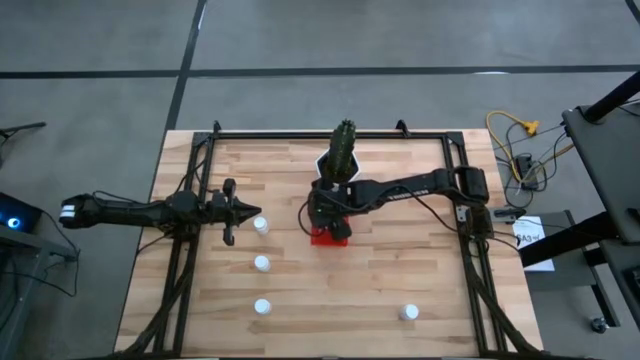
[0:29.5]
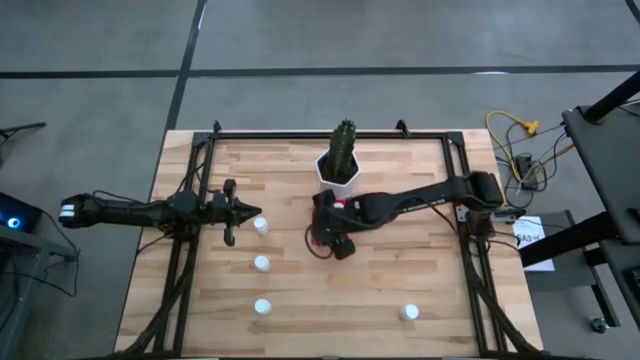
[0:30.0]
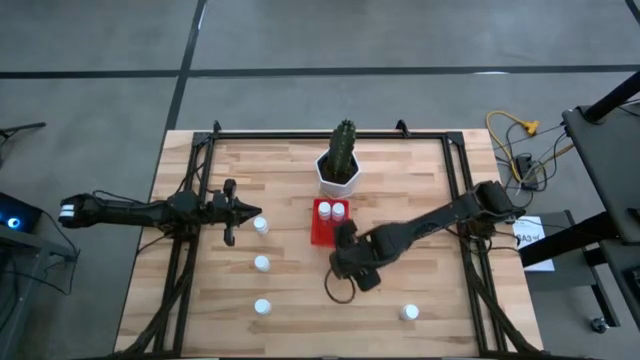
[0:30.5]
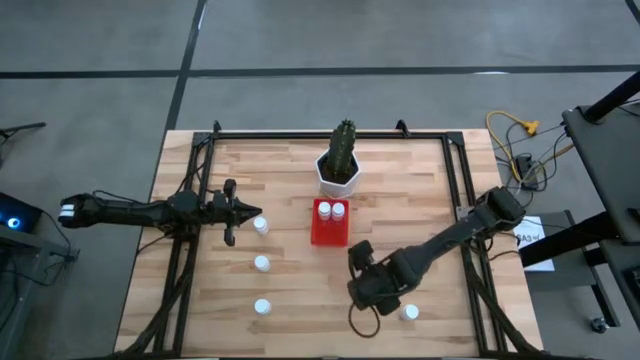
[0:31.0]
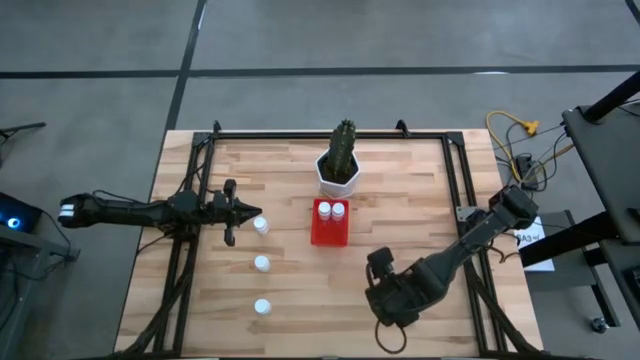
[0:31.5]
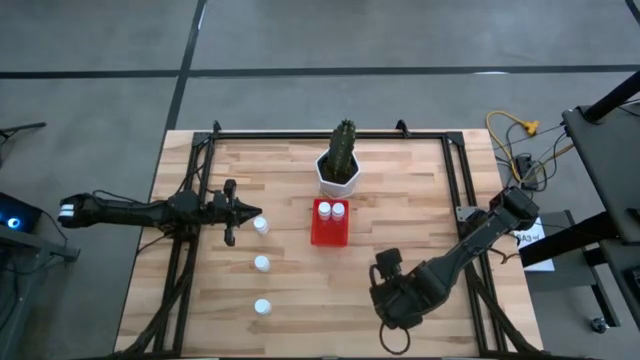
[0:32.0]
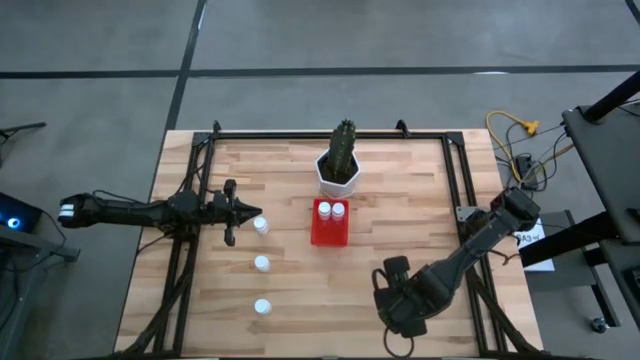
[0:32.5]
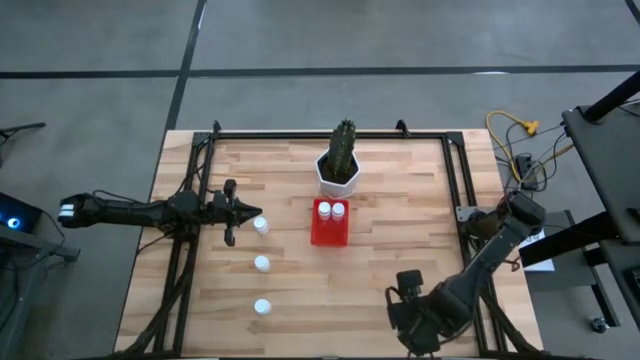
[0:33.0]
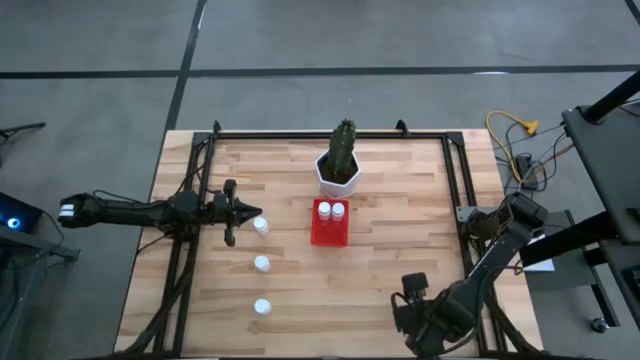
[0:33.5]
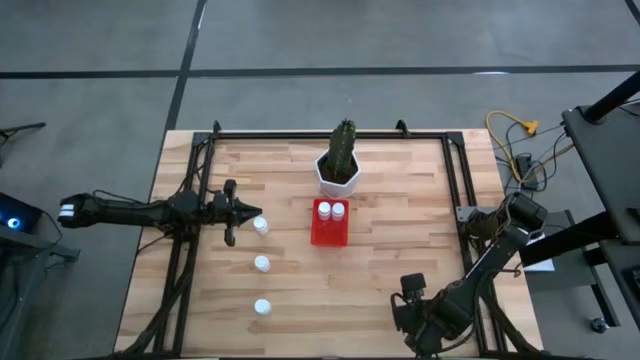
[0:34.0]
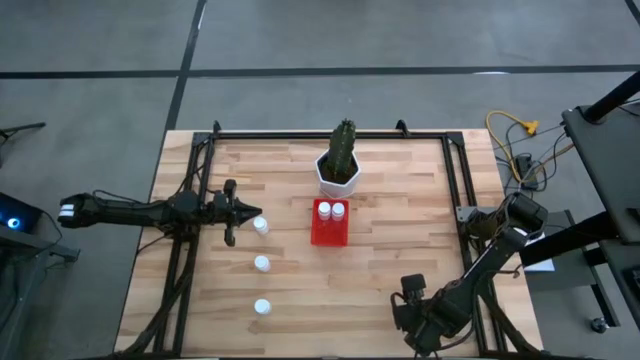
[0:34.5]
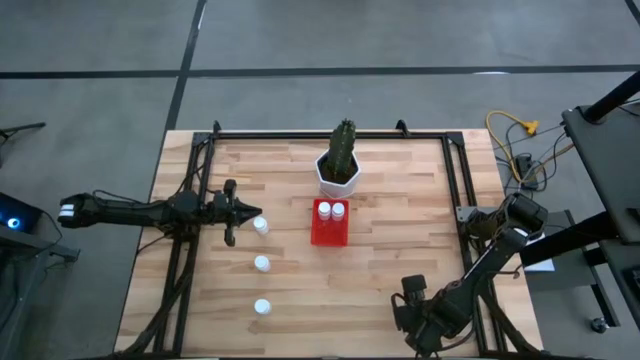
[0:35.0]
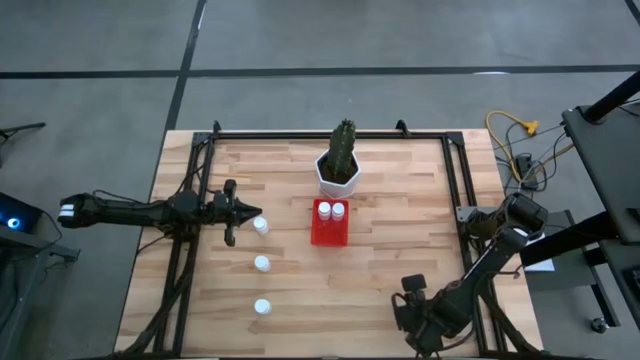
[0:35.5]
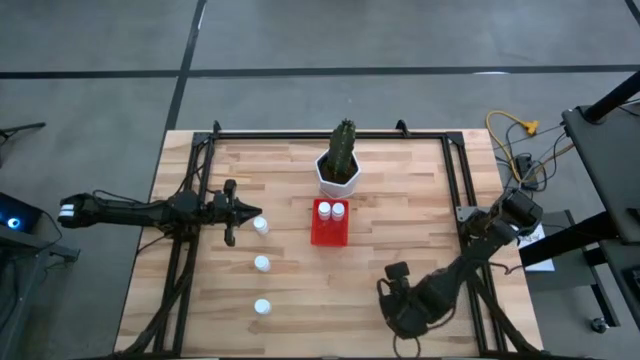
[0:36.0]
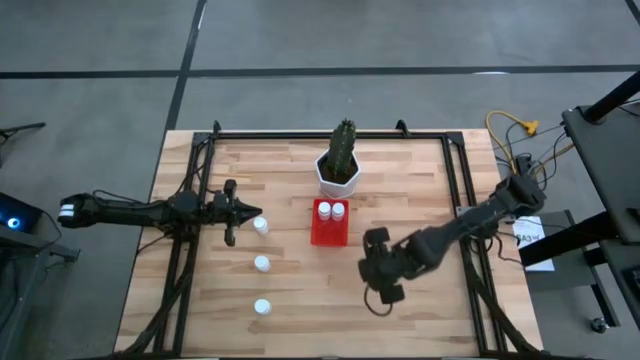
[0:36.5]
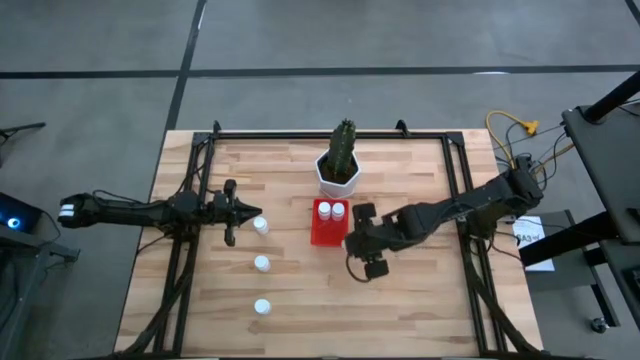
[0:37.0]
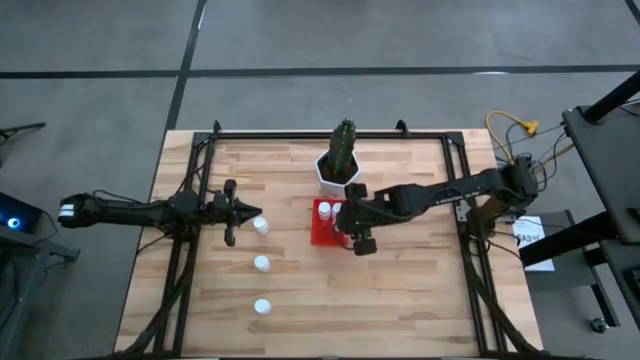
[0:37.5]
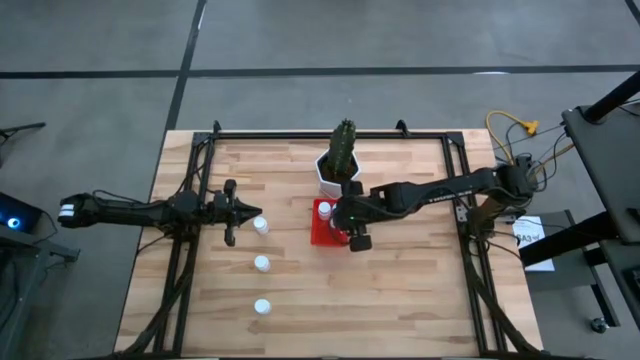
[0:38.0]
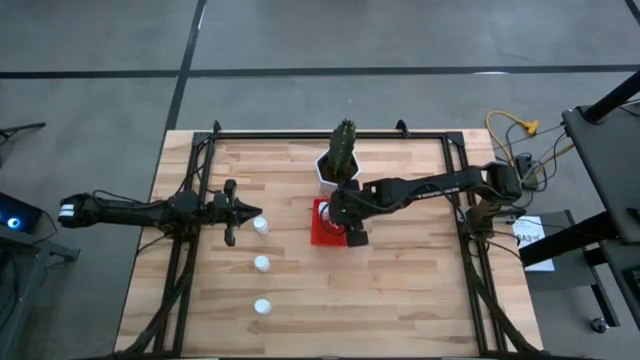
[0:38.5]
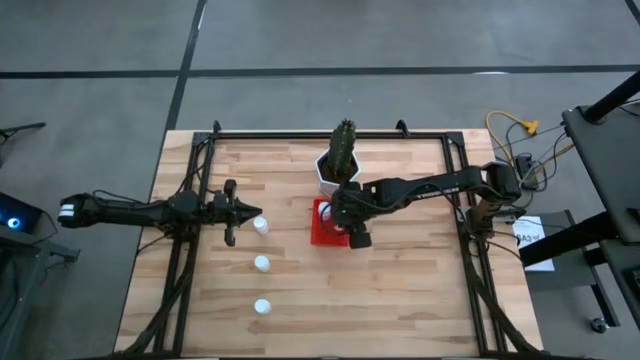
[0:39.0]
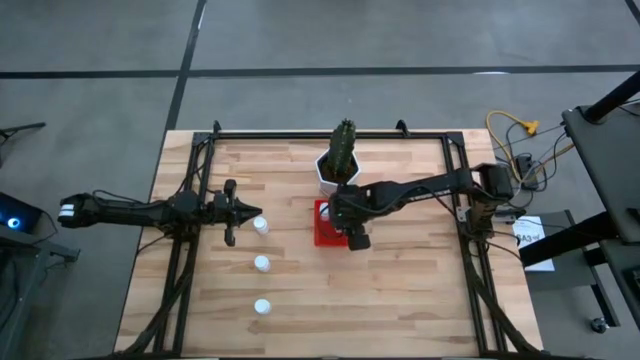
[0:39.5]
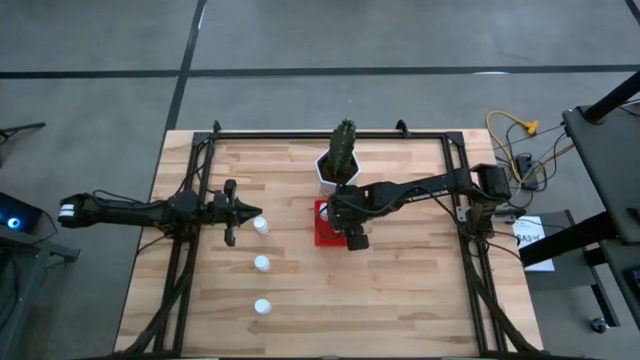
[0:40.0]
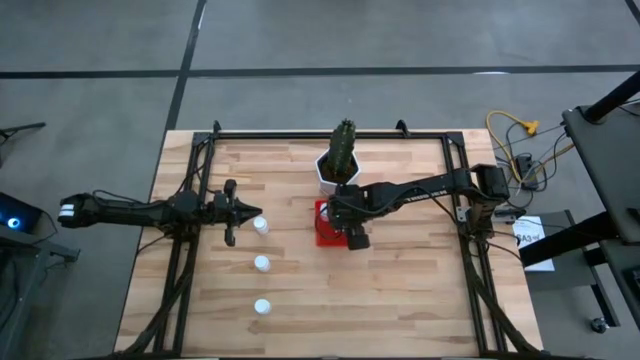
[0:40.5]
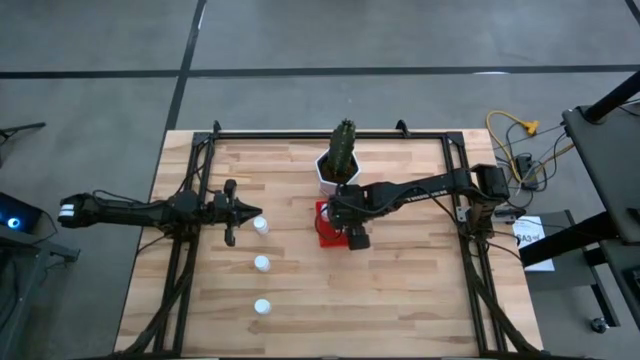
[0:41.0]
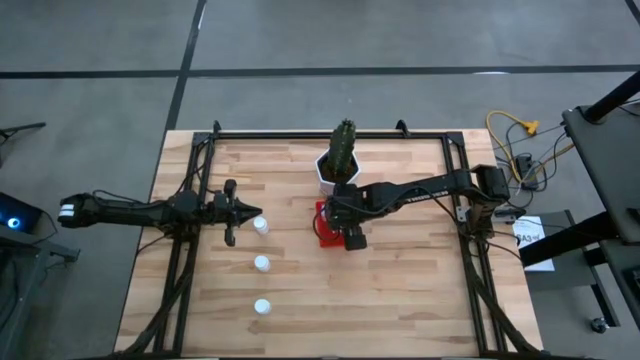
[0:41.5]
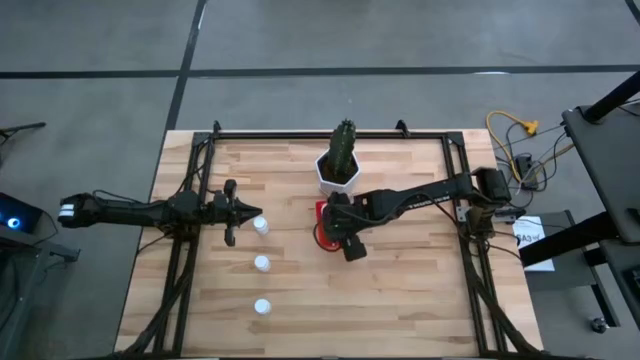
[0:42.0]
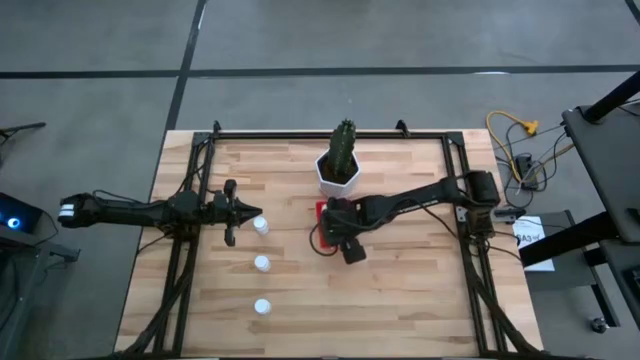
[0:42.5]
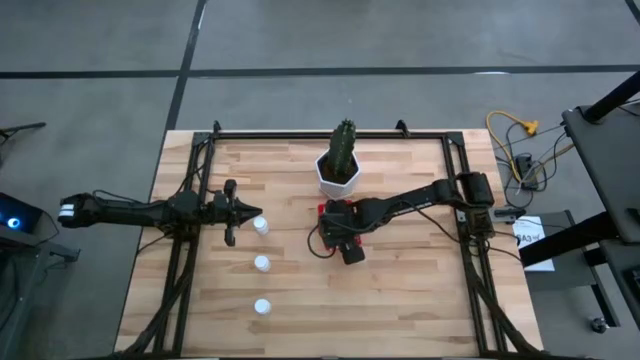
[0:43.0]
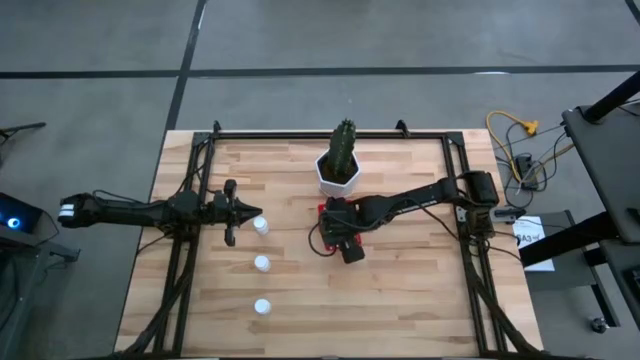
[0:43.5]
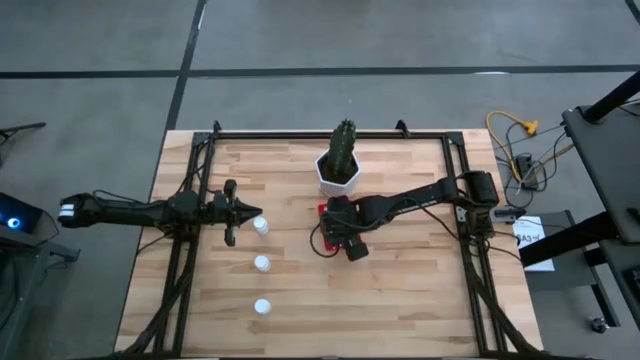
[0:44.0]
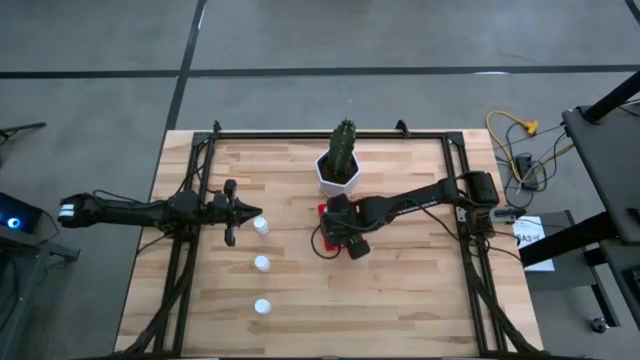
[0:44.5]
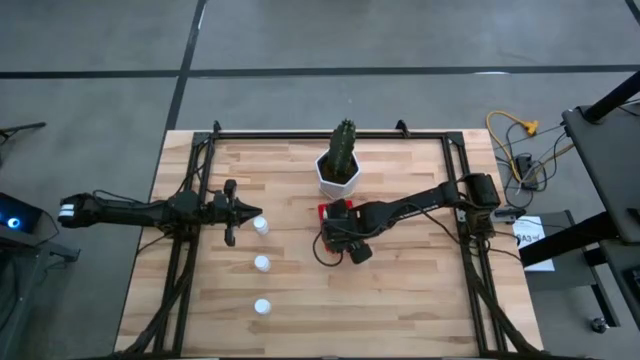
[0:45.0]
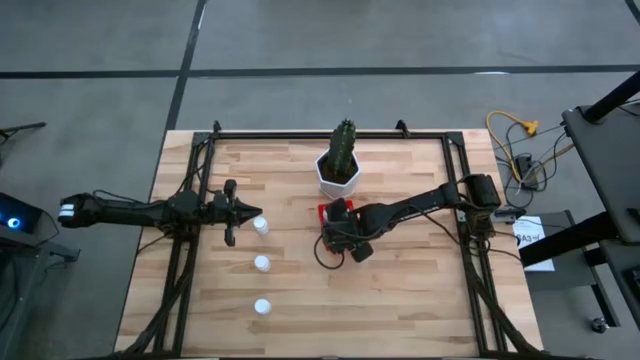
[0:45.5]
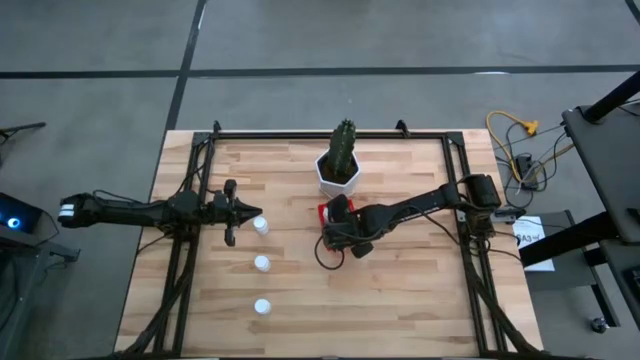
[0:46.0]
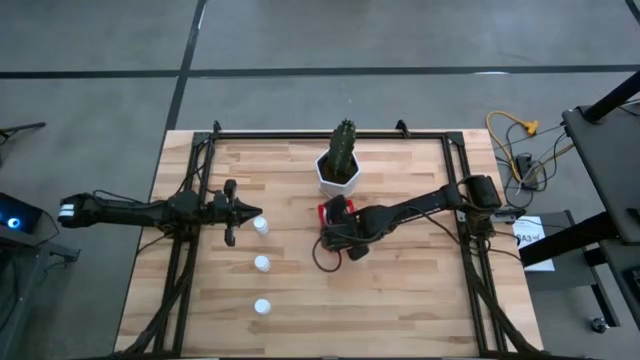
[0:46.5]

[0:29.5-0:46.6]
Task: Pick and place pill bottles into a basket
Put the white pill bottle into the red bin

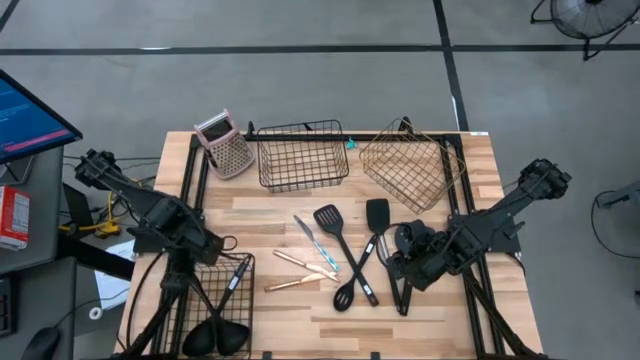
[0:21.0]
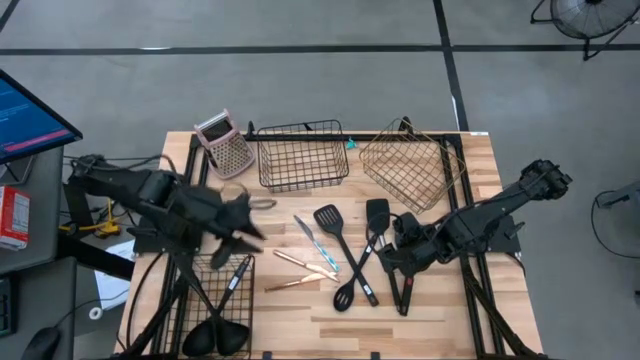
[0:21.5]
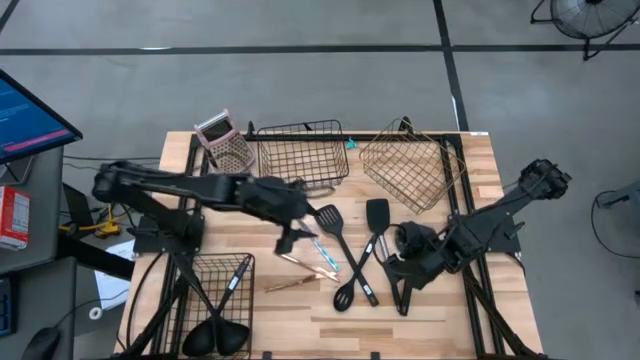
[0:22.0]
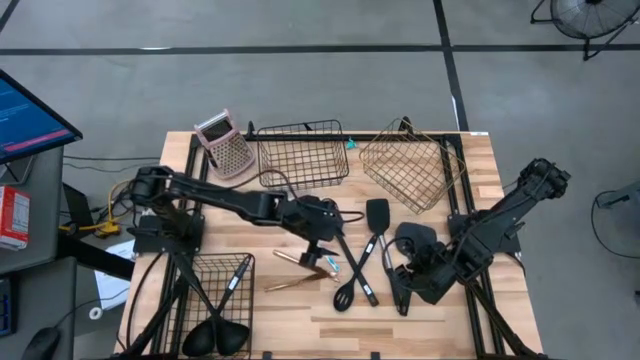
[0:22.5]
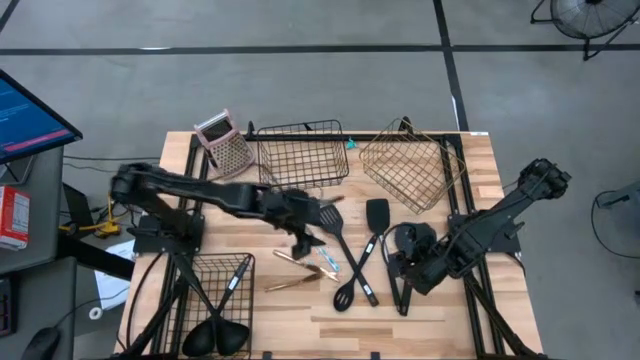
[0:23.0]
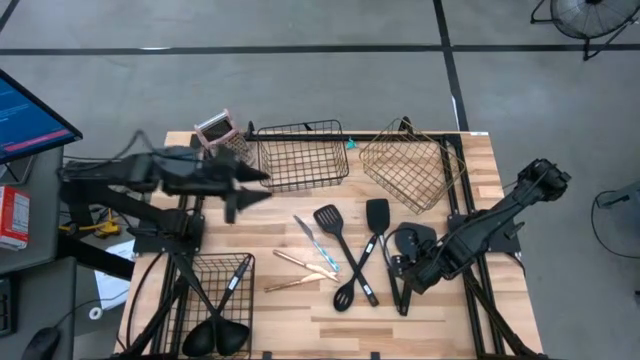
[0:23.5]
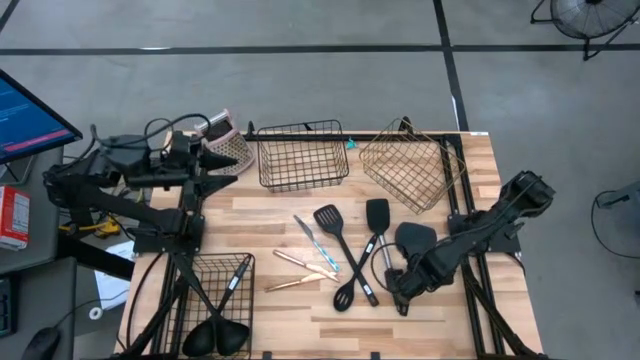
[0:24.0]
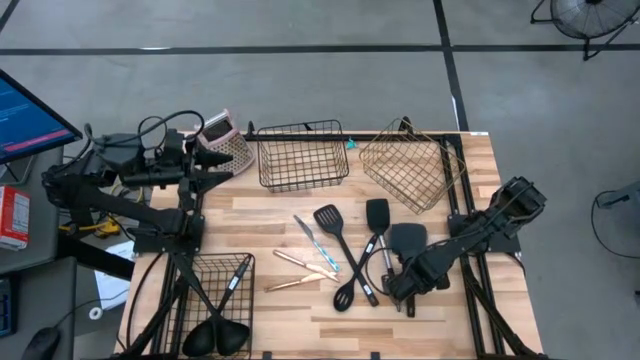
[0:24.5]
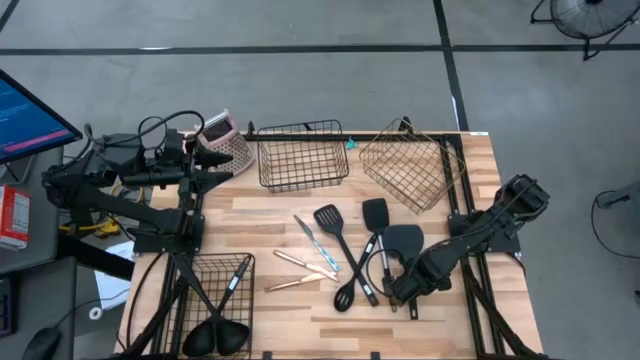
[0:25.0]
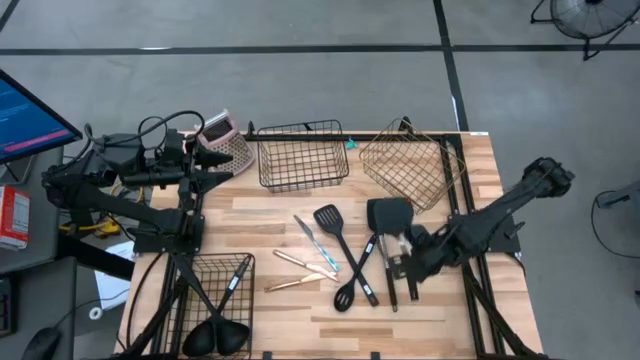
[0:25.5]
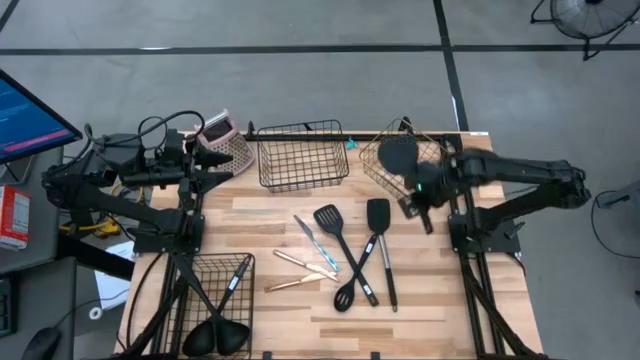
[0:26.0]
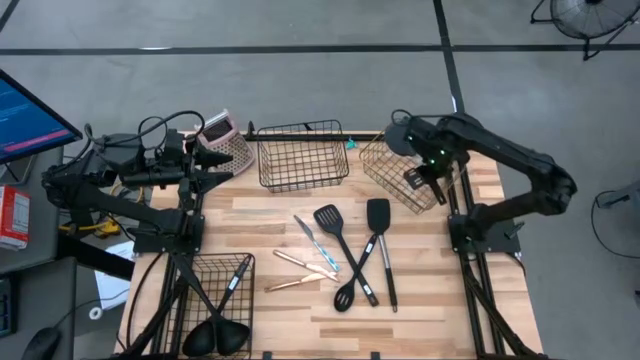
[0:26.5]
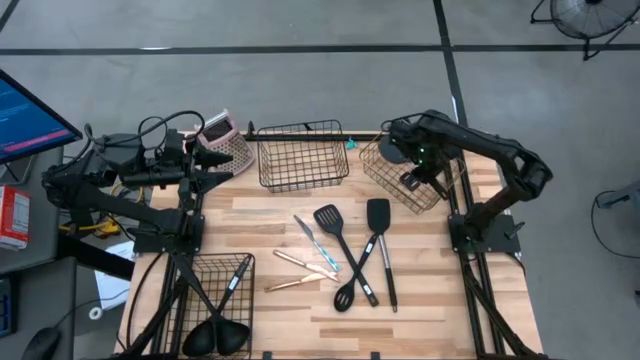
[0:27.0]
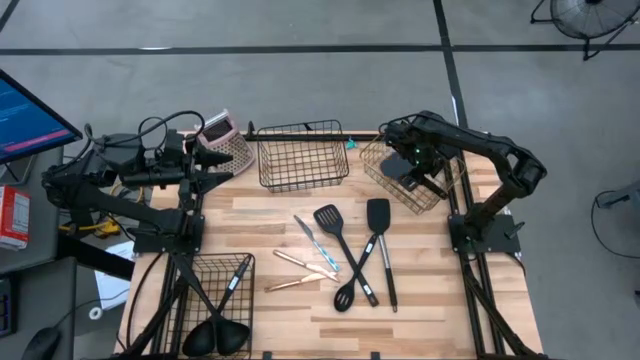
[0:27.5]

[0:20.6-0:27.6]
Task: Pick & Place Kitchen Items
Put the black spatula into the brown wire basket
